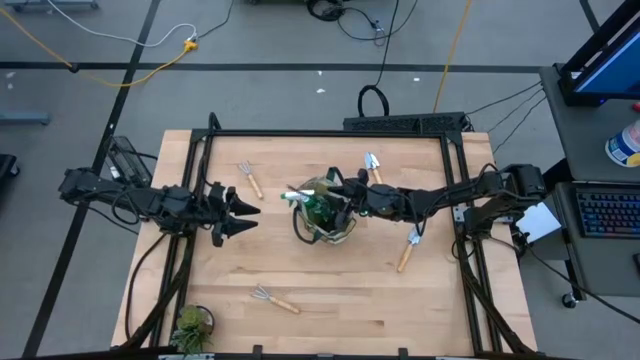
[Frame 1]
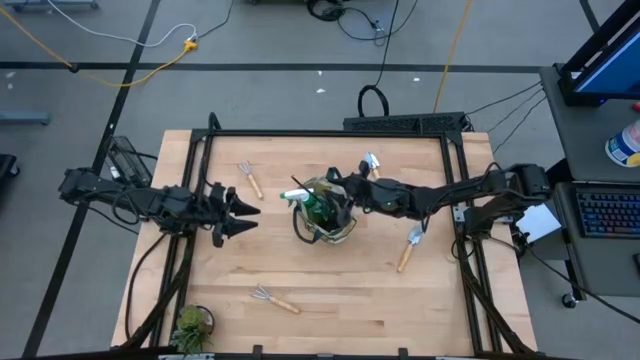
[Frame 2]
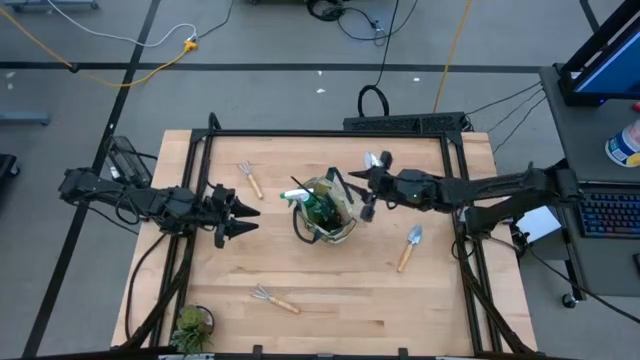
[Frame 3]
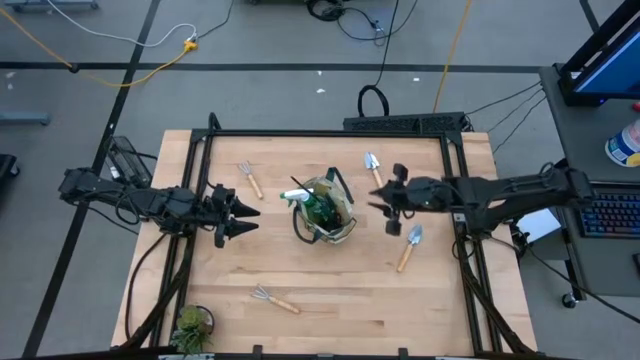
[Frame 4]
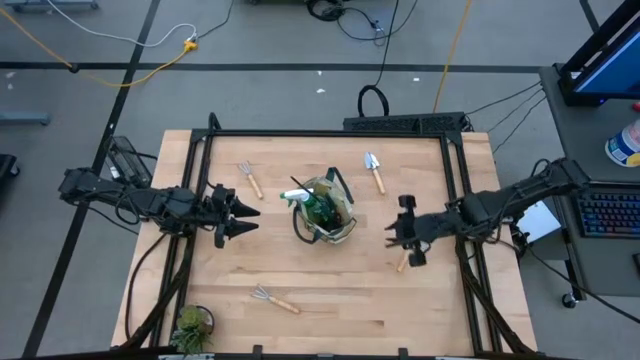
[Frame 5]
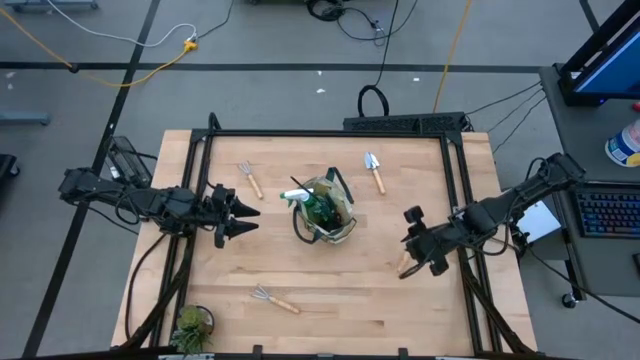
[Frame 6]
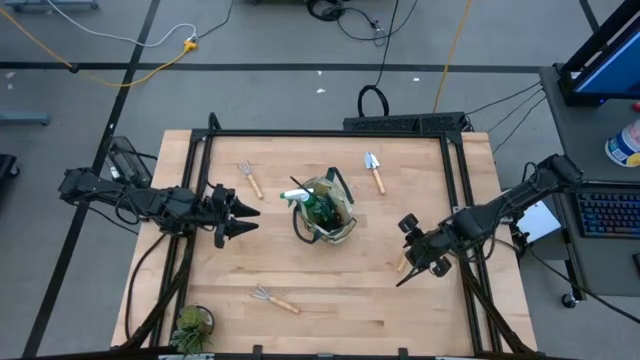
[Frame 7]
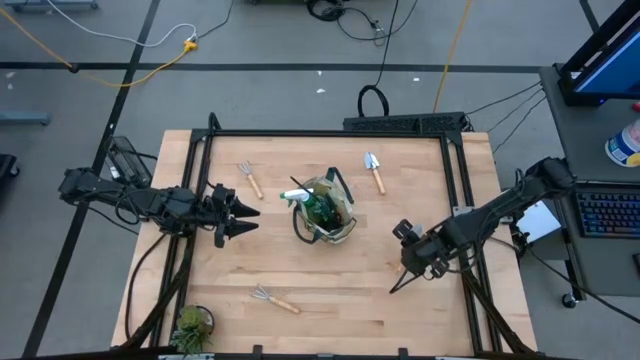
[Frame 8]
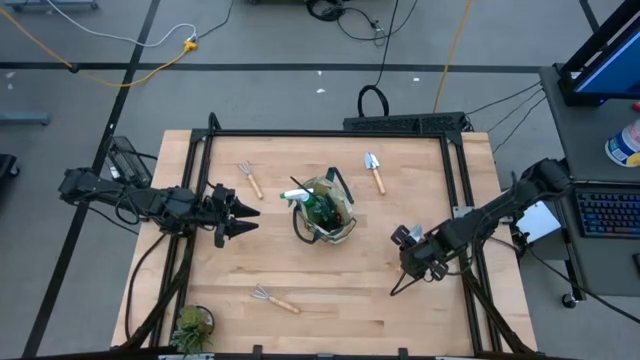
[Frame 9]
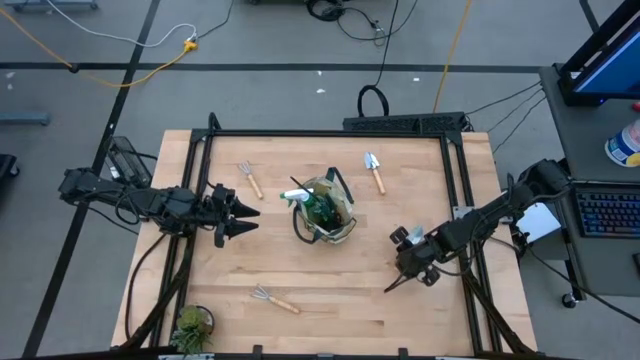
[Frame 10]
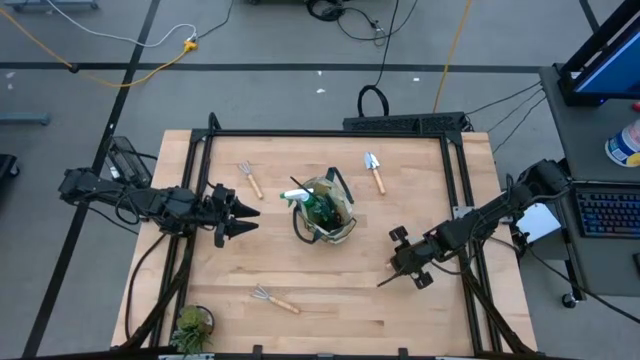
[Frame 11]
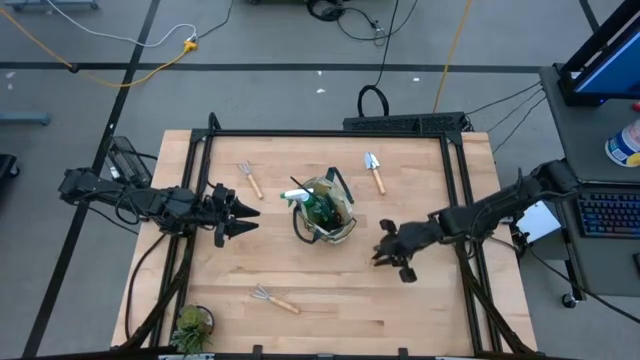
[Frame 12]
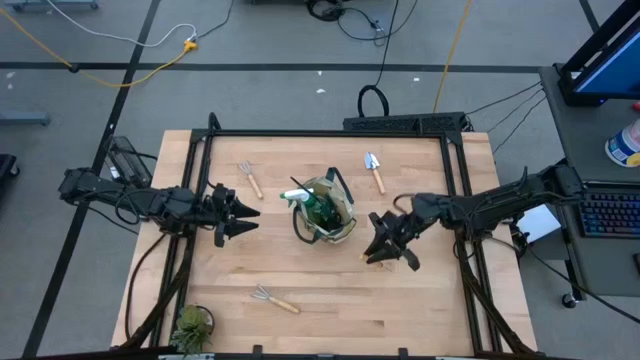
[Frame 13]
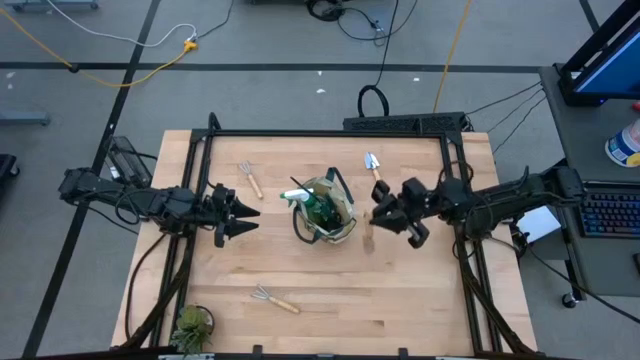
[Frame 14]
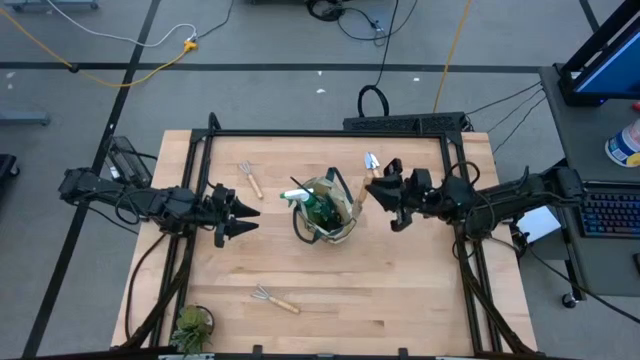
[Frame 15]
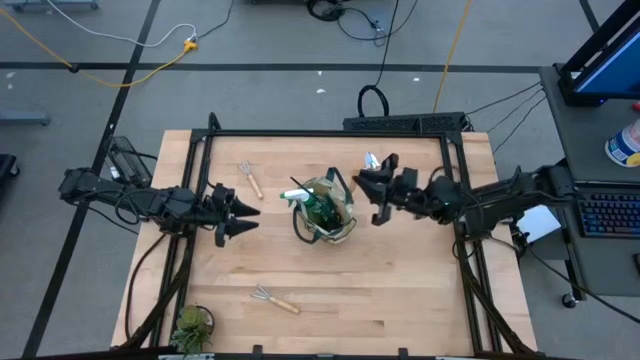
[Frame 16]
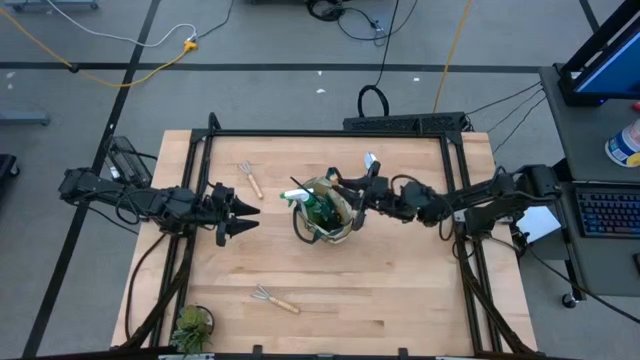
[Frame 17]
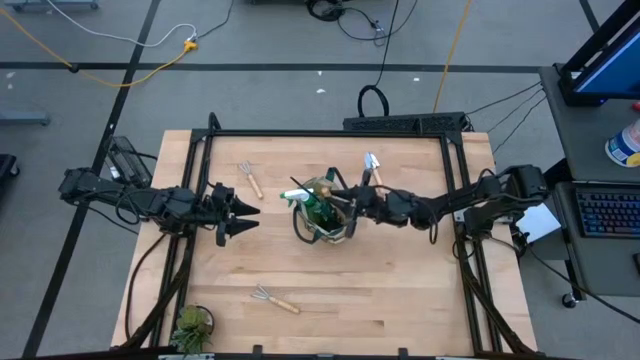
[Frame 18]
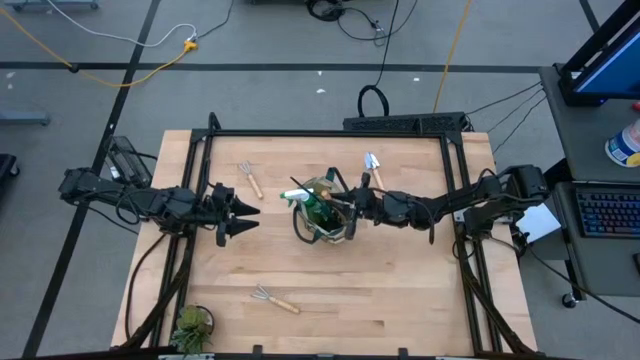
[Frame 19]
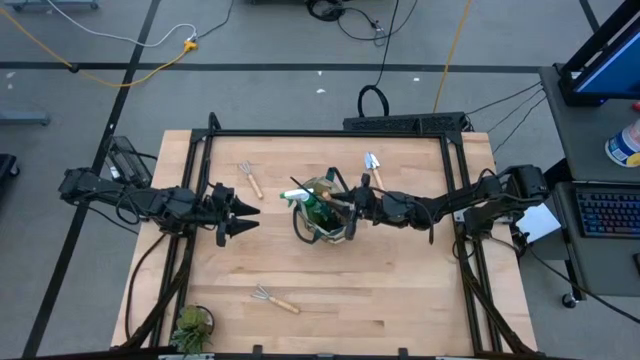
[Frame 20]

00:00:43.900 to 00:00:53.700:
Task: Pick & Place Garden tools in Gardening bag
Put the bottom trowel into the gardening bag

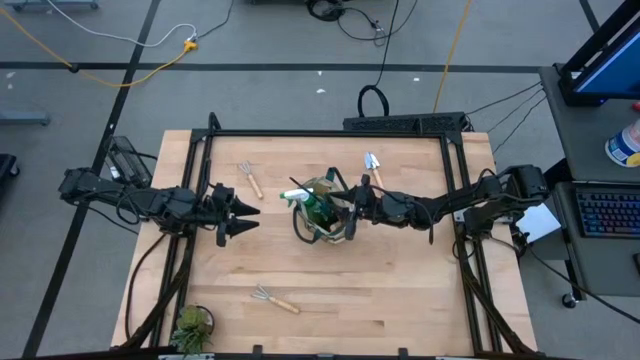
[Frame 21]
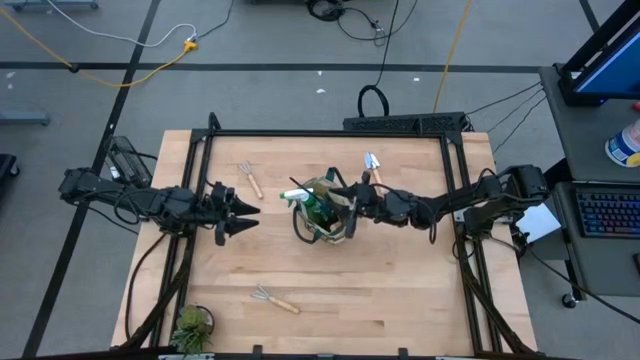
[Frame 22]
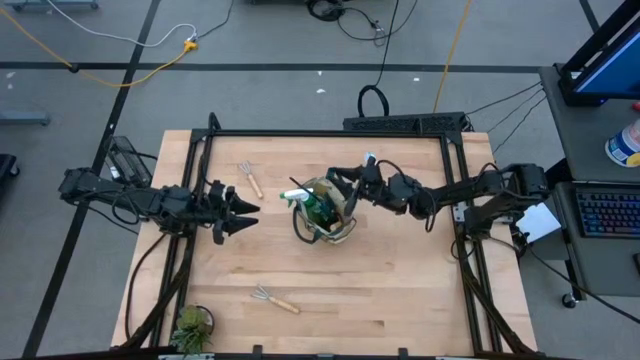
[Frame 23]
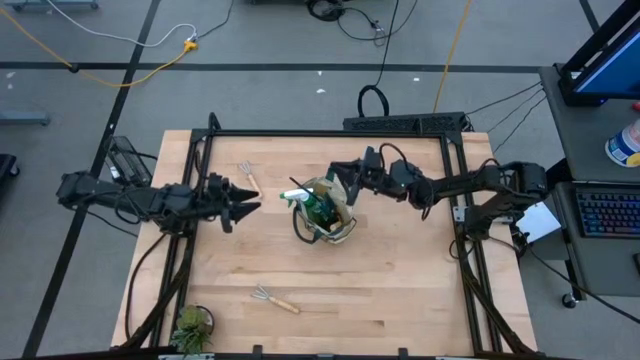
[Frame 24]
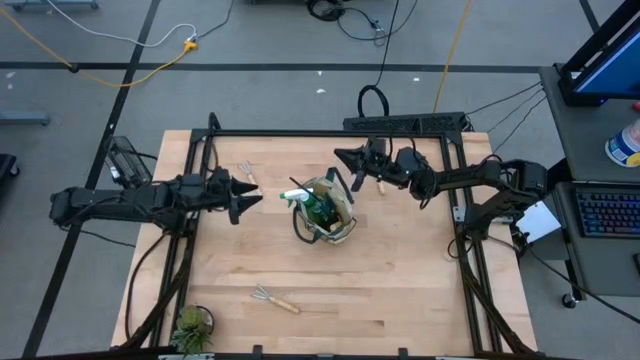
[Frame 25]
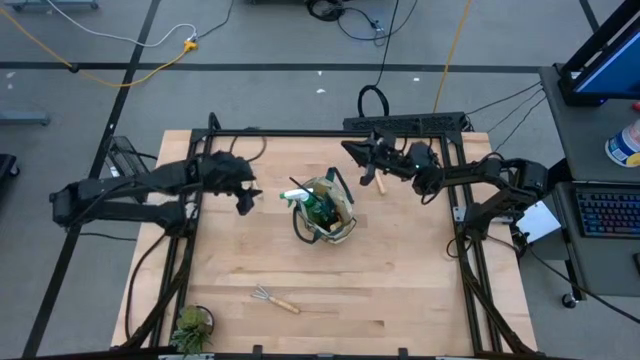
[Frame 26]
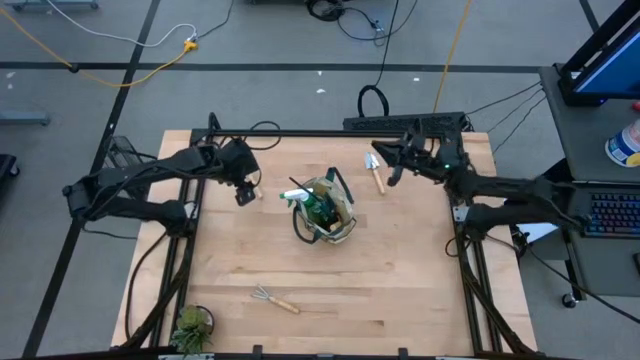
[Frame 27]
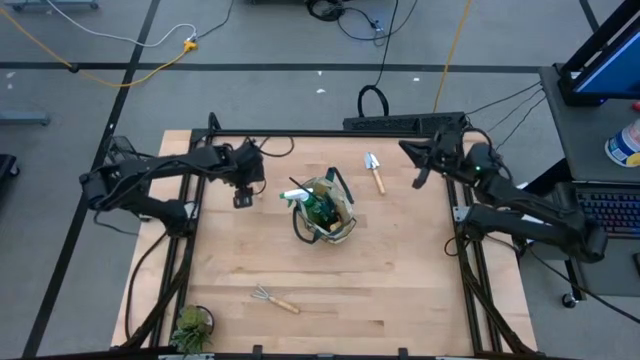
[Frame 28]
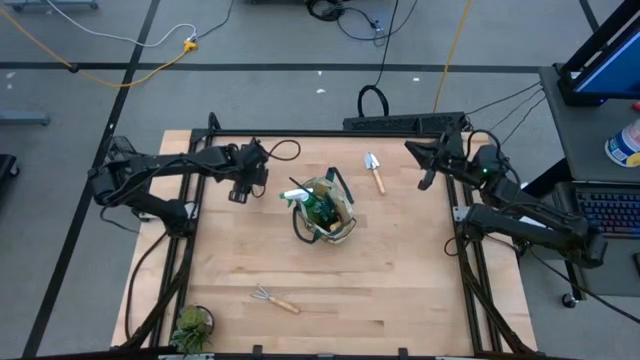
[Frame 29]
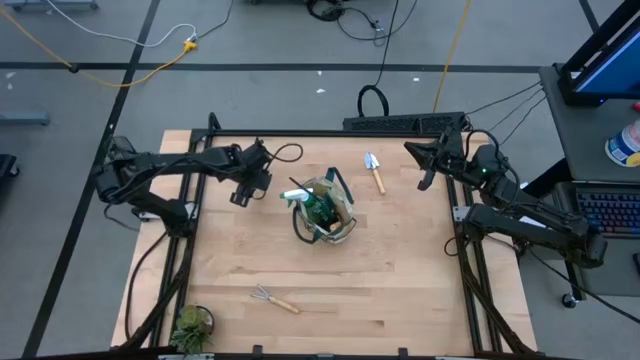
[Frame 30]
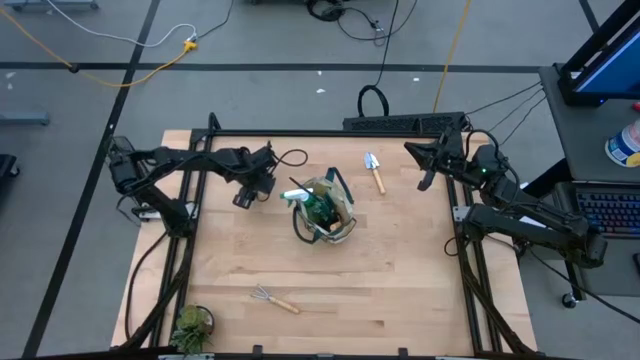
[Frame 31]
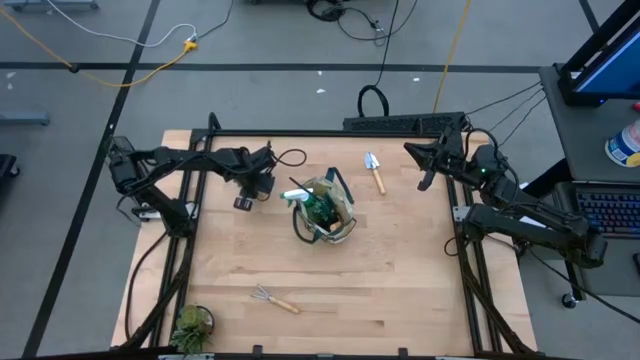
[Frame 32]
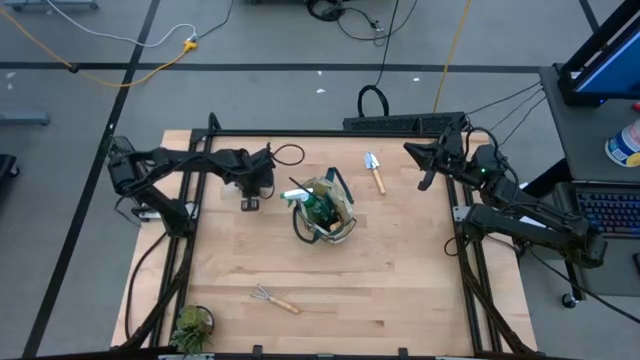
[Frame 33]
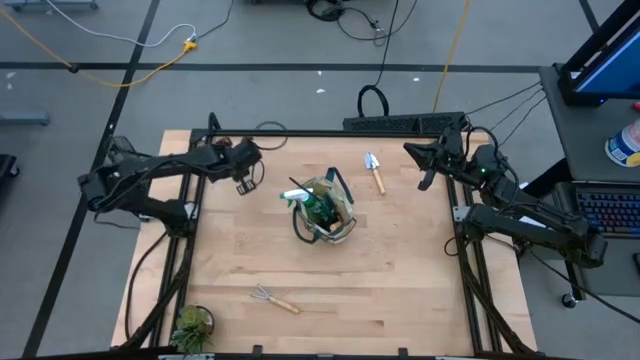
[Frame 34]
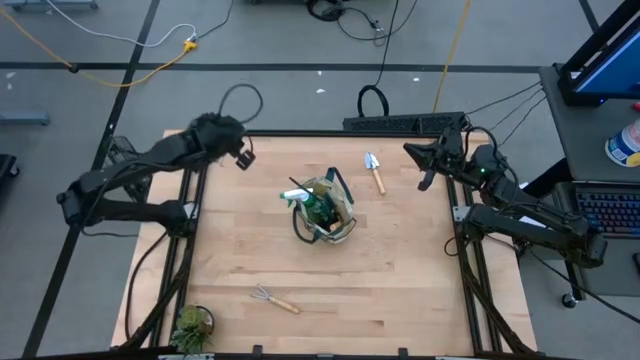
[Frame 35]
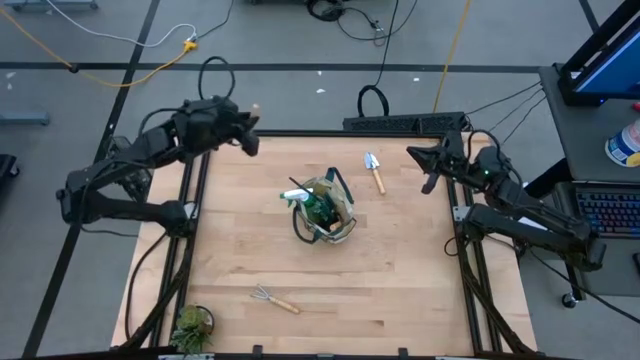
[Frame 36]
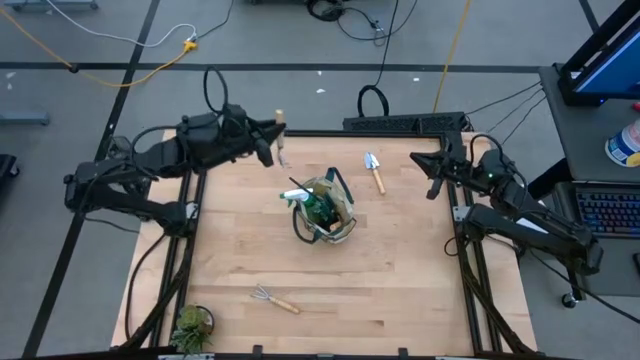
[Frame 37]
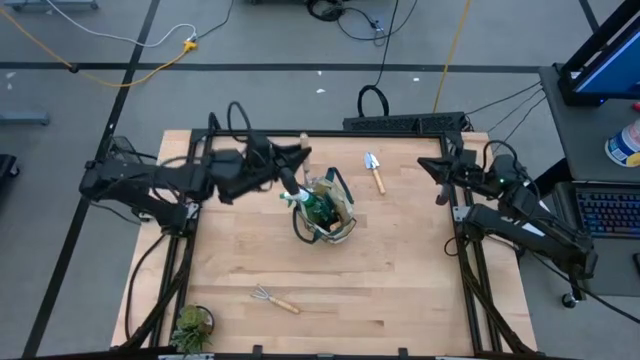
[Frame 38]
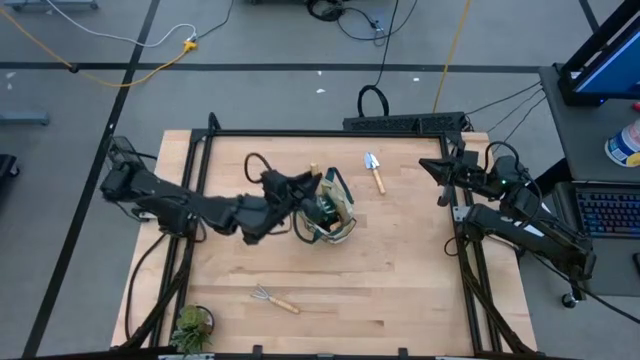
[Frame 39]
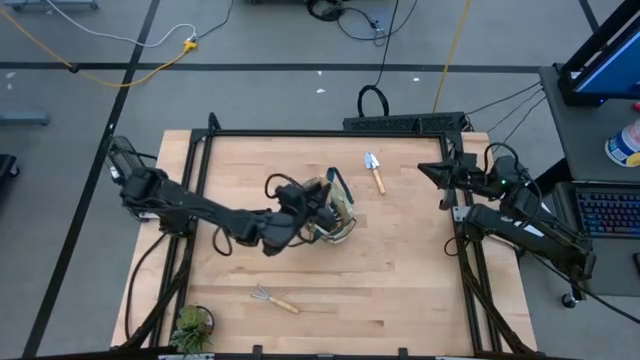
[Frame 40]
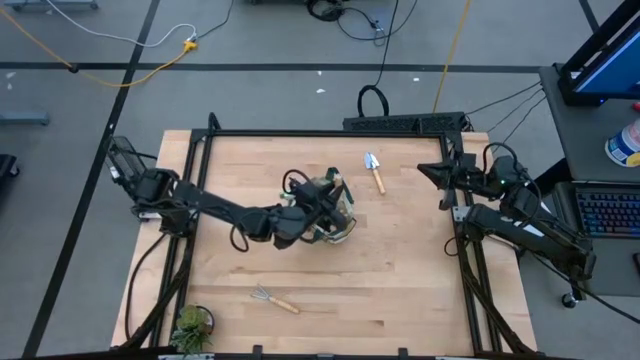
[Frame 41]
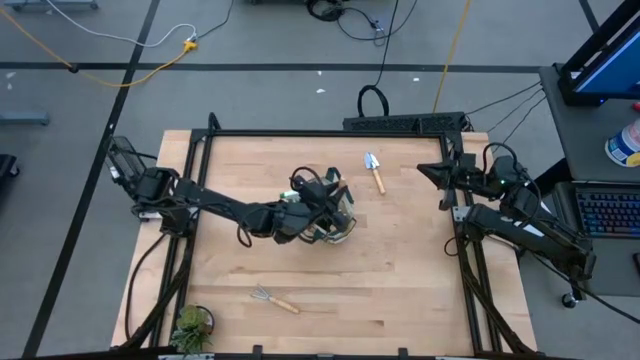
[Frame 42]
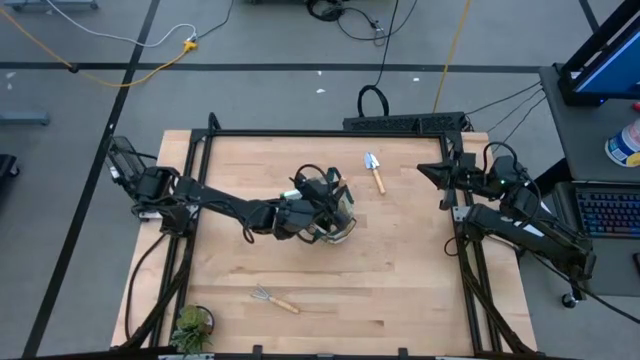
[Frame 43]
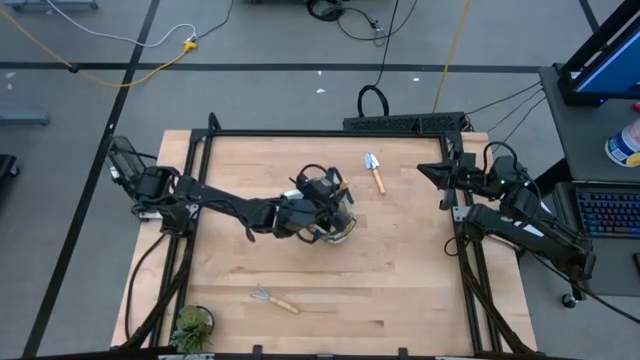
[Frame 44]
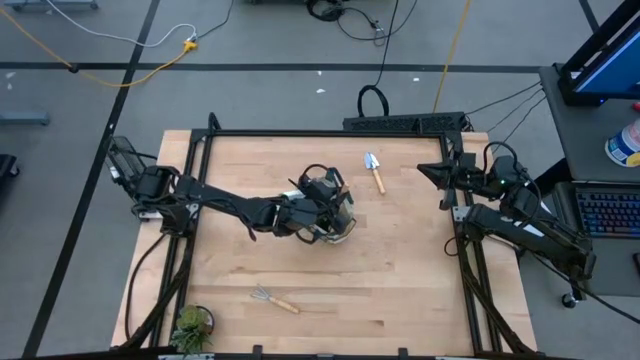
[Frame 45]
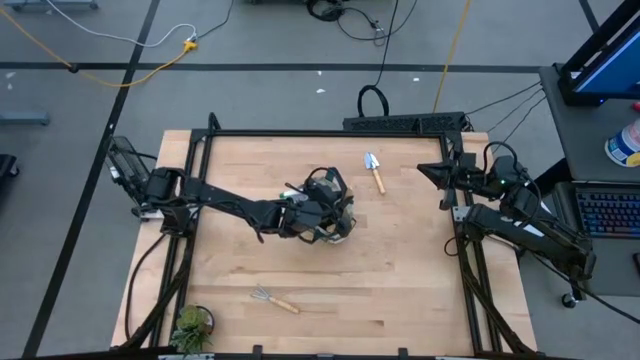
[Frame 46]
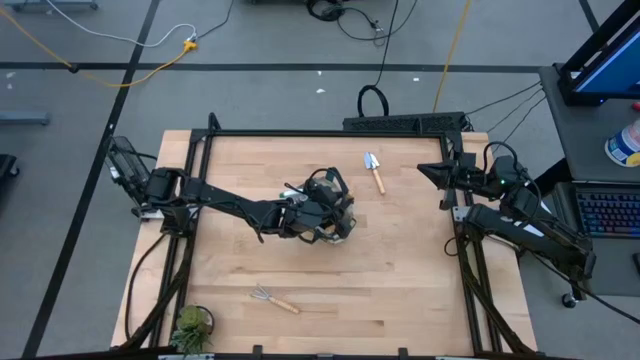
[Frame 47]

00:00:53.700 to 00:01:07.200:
Put the top hand rake into the gardening bag
